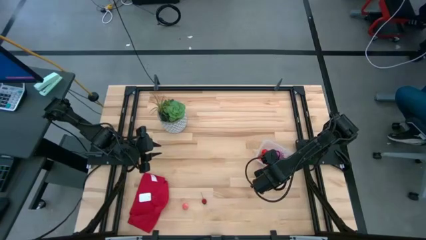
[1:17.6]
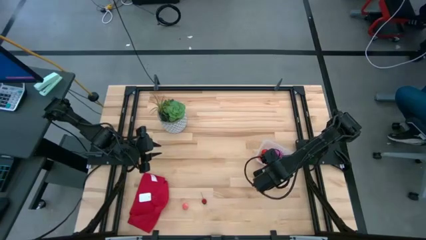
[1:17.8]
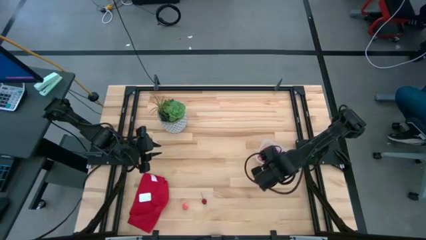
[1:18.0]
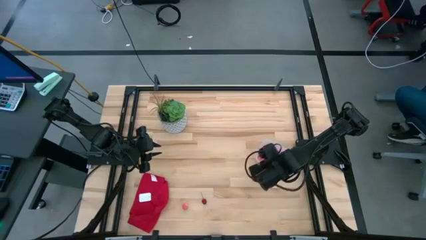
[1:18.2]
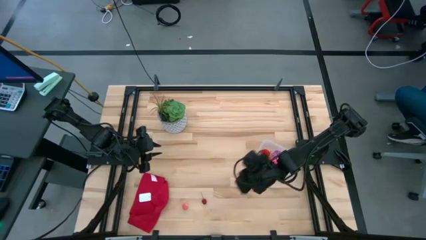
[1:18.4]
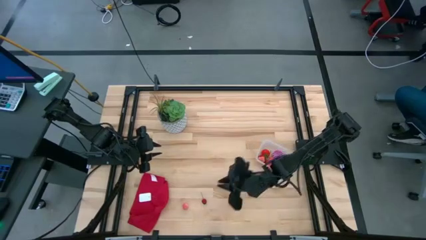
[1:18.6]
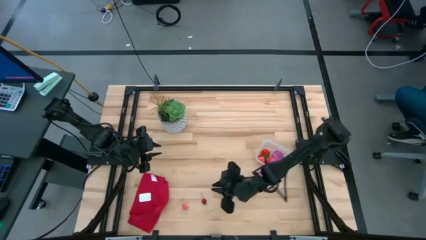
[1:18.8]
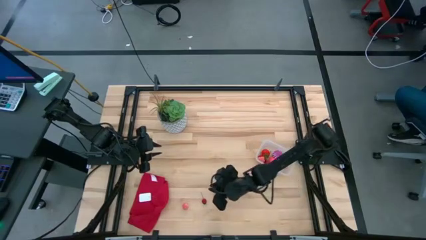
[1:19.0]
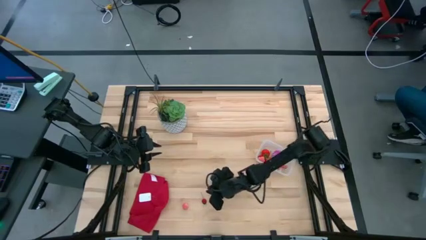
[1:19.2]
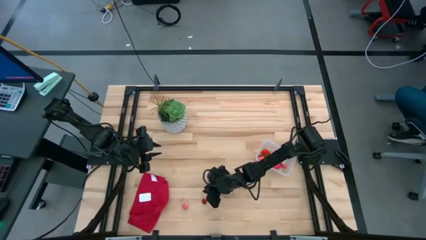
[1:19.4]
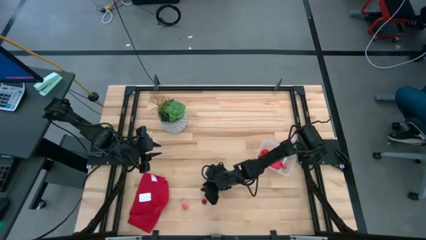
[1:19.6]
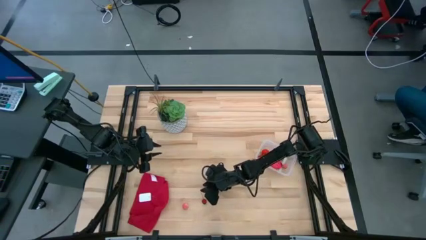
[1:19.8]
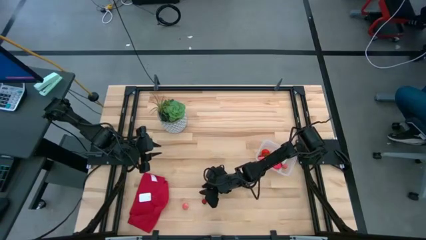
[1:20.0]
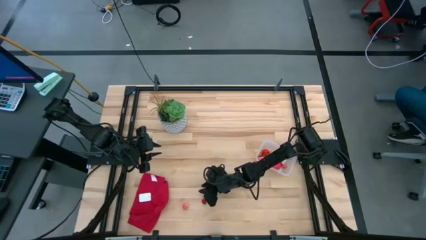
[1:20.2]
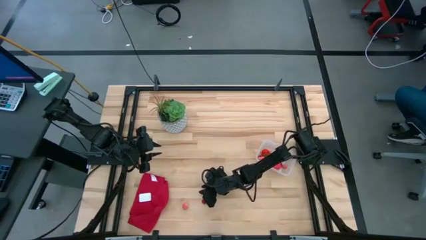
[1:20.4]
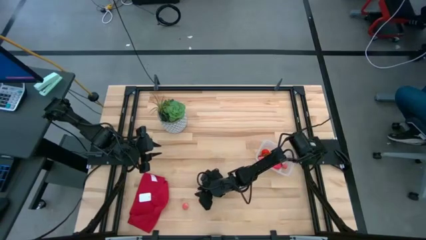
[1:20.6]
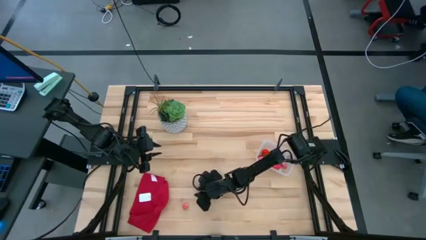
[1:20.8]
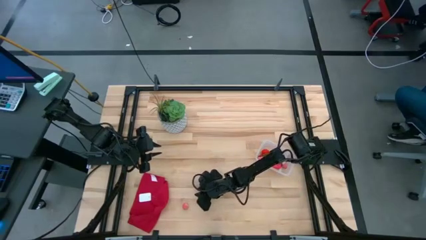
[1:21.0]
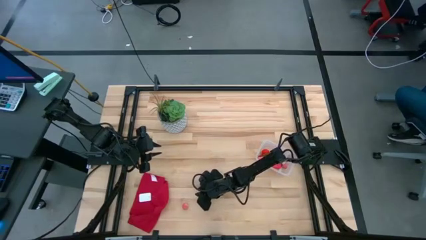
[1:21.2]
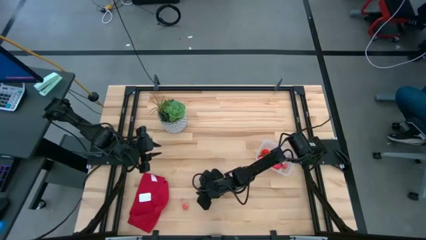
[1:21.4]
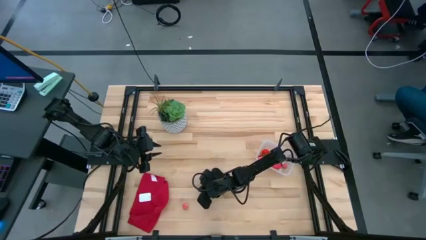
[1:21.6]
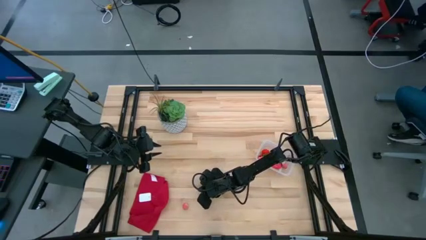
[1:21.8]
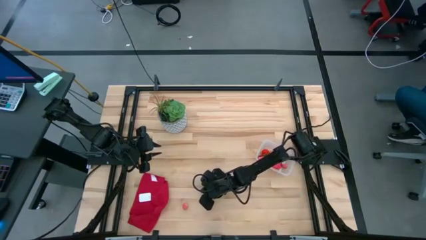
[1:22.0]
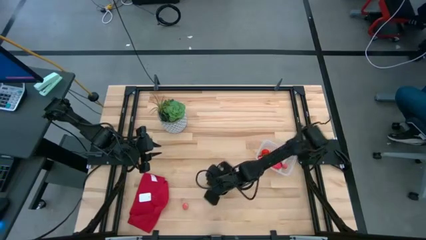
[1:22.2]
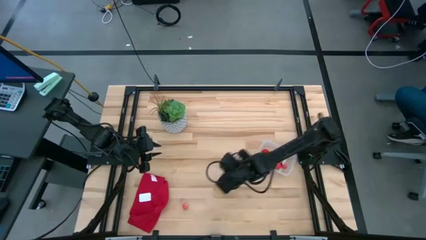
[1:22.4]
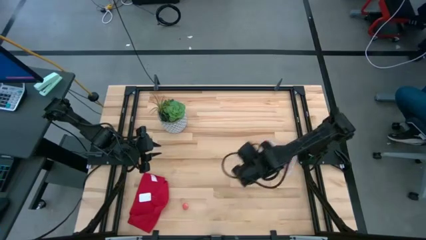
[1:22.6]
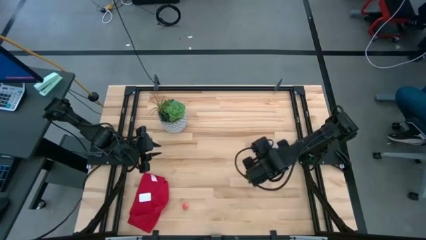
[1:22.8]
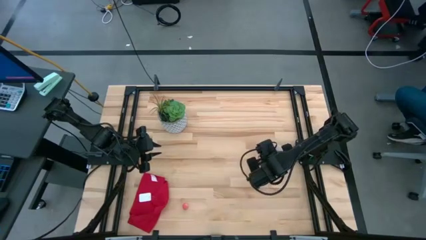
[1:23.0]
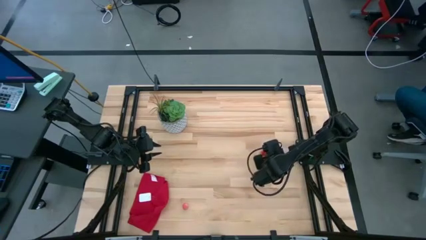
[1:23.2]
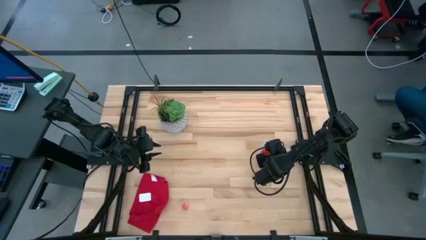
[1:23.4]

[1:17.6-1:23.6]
Task: Pick and placing Produce into tupperware
Put the red cherry into the transparent bin

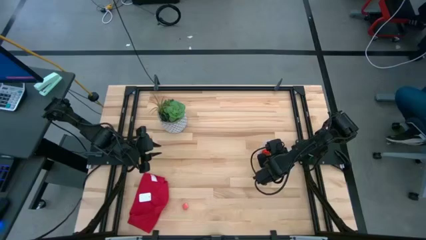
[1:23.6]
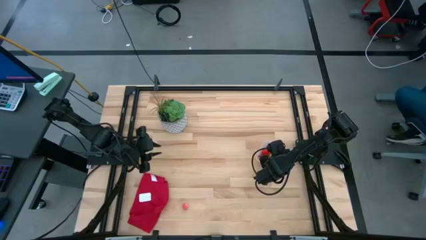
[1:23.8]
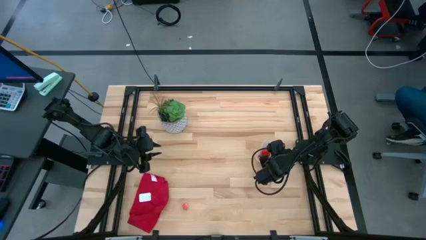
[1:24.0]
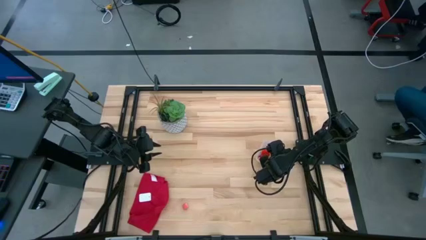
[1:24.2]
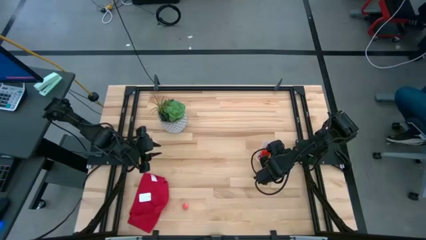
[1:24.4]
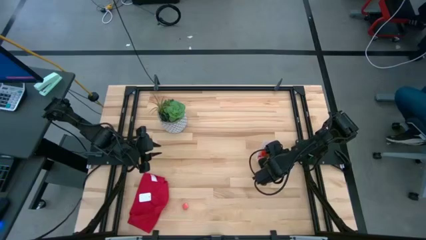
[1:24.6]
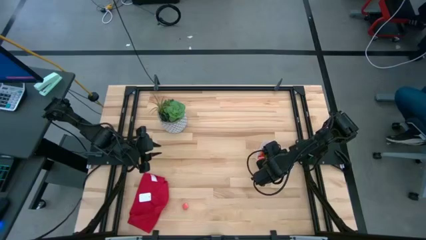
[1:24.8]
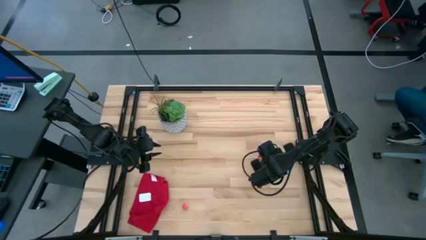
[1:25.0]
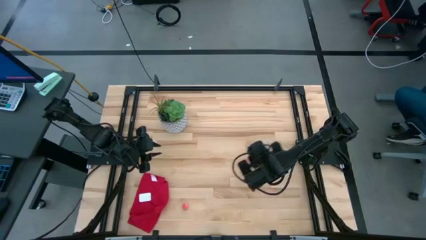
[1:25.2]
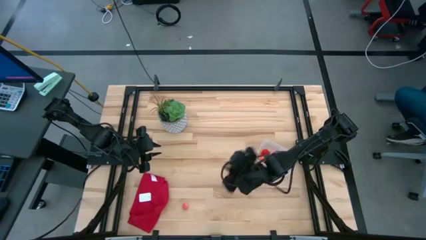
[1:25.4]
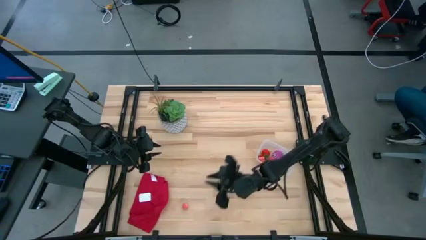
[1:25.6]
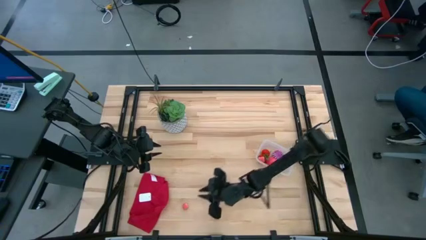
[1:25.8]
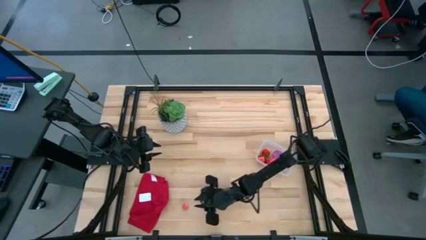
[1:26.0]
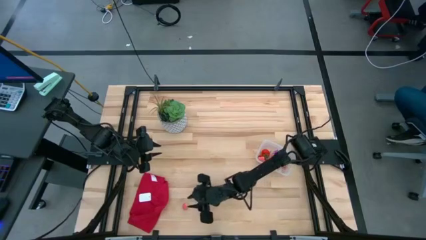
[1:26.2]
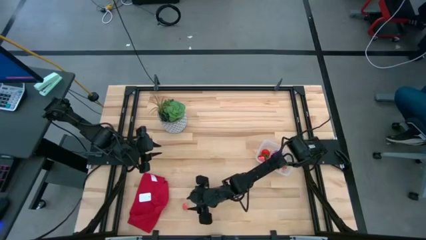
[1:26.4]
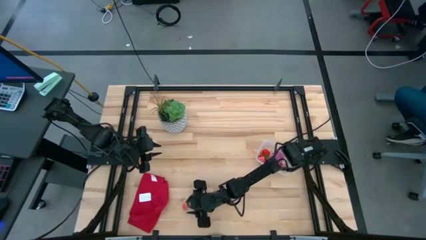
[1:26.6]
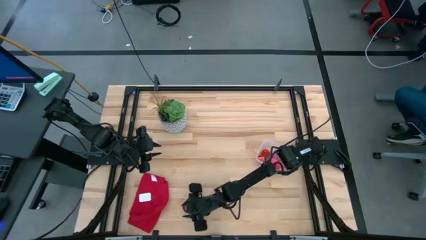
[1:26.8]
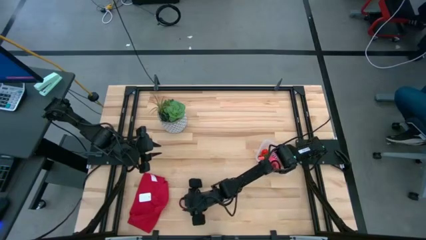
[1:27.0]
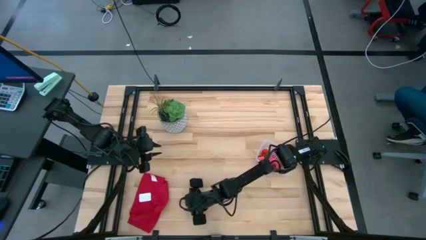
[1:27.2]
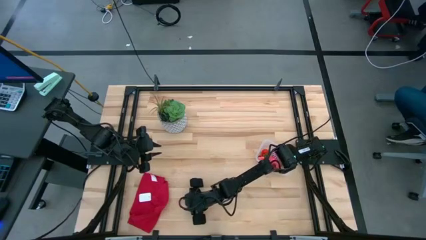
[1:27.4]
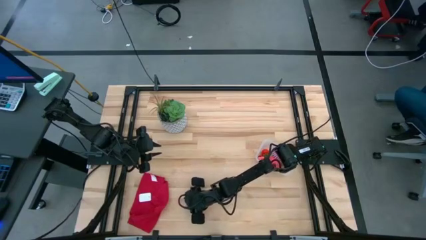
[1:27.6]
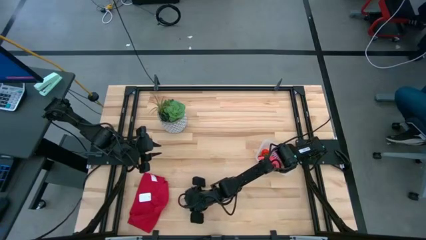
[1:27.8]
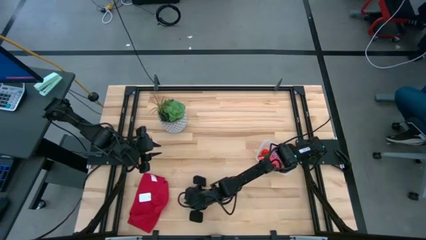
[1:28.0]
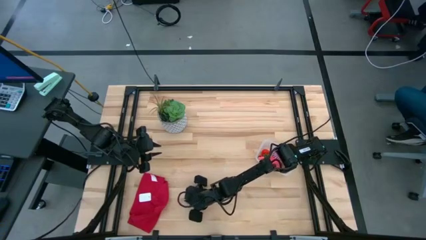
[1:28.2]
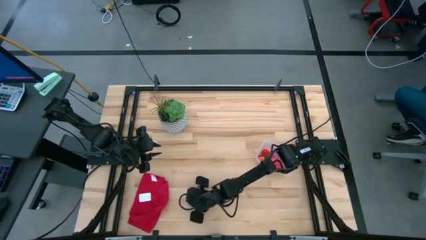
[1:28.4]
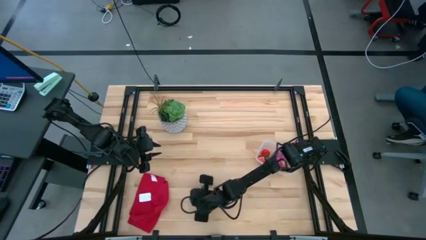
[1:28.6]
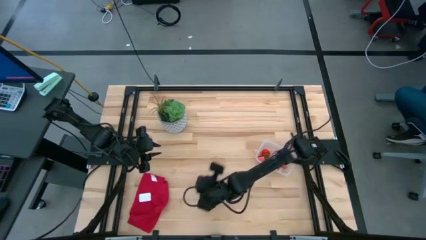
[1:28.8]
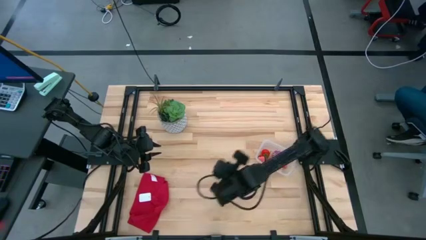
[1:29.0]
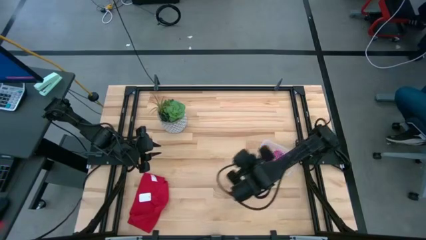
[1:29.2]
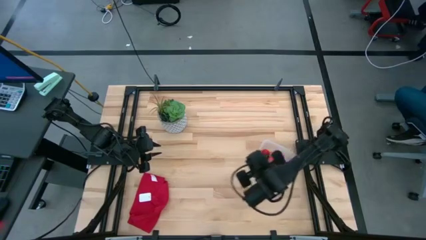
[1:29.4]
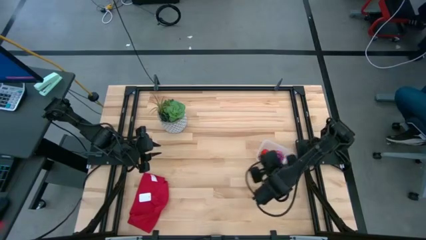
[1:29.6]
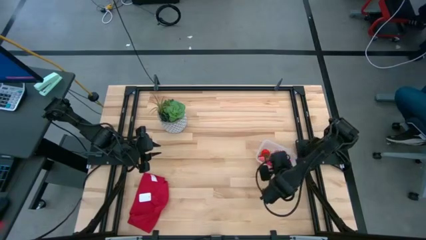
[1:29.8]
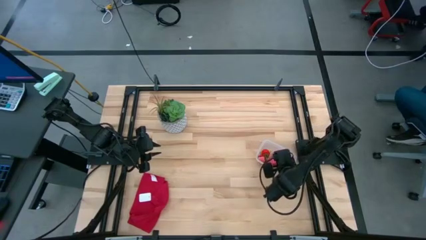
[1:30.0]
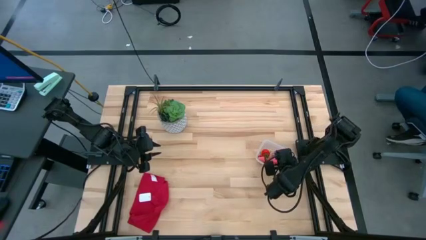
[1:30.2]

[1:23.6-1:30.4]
Put the pink peach into the transparent bin

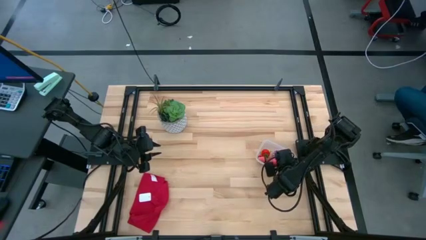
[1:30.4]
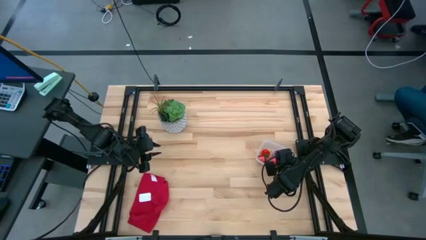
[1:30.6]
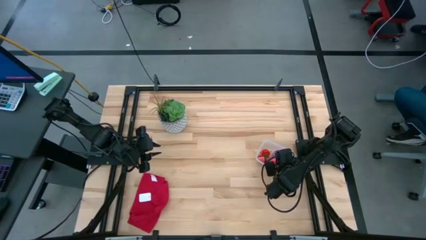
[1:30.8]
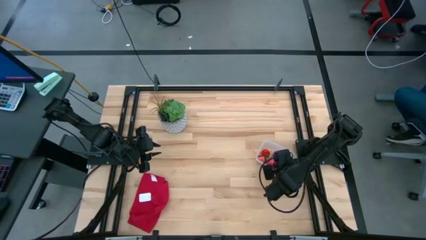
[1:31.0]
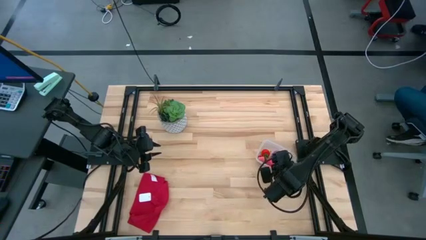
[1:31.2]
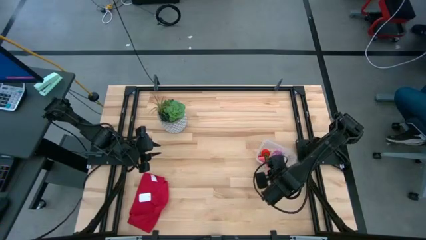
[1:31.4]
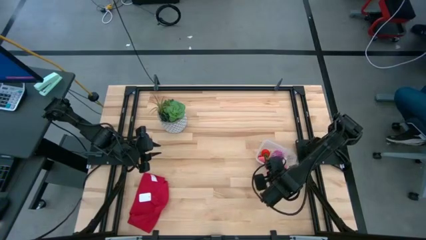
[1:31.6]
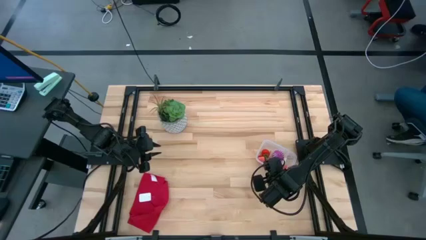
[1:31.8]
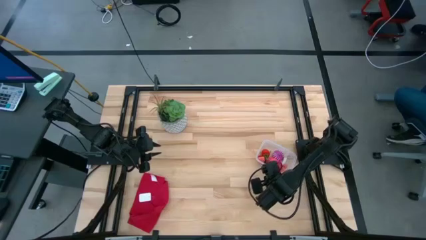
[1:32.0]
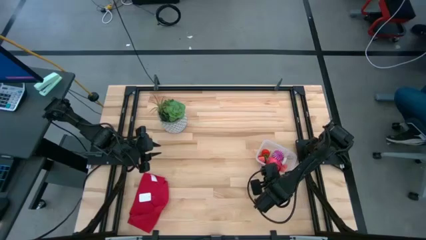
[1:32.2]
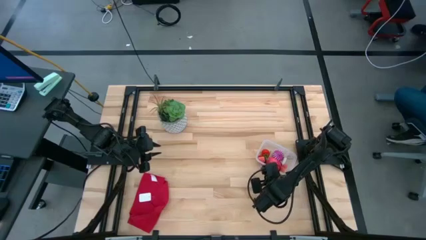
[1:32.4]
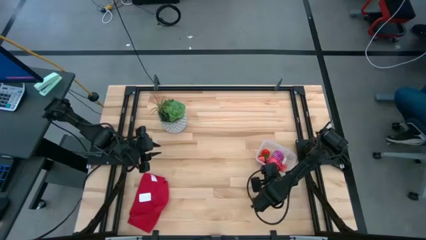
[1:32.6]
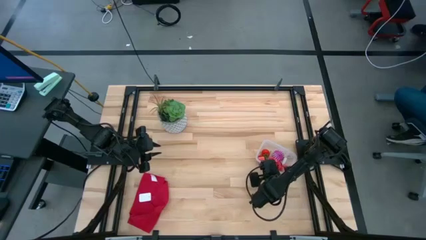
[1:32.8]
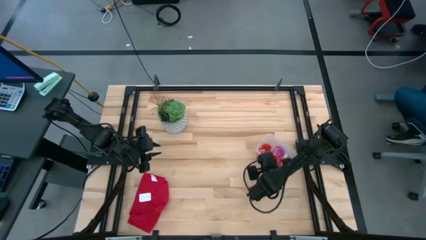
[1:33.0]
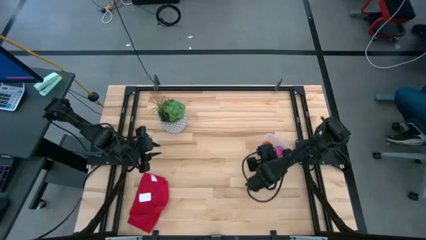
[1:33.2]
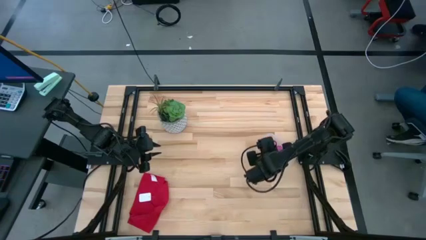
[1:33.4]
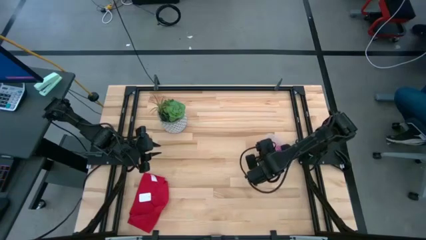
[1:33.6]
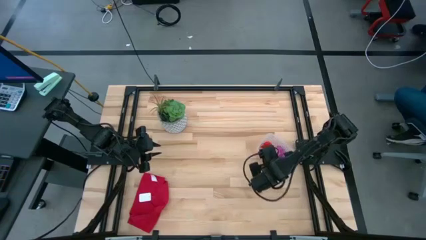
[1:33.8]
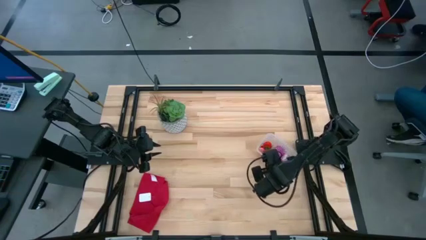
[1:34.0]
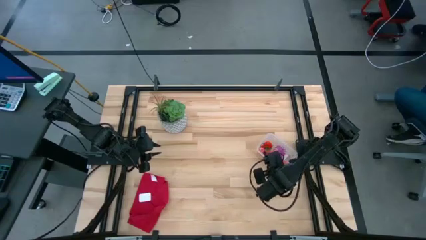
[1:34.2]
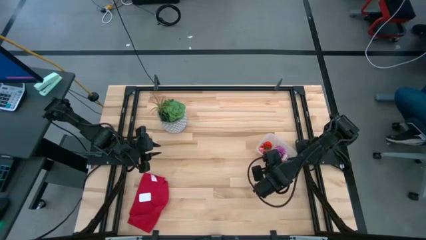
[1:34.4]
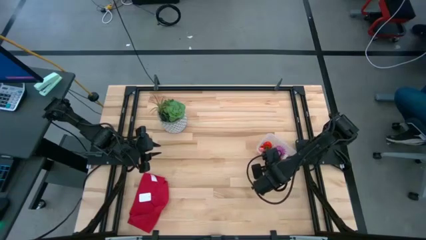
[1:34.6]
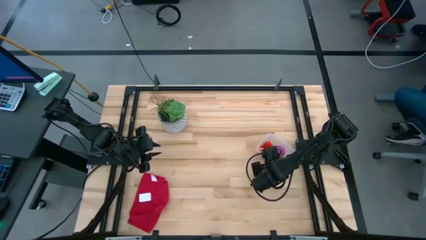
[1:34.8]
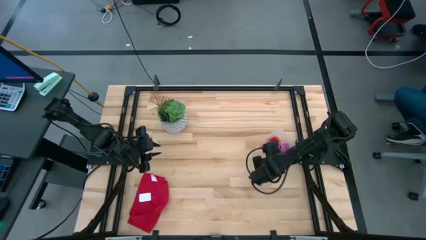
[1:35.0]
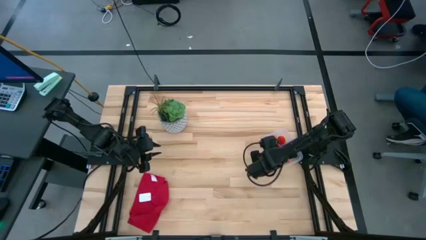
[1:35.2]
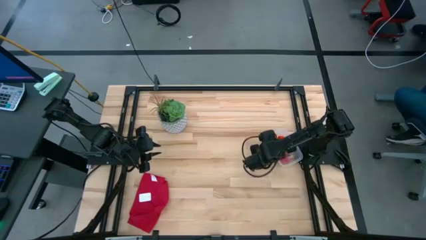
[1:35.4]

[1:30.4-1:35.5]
Adjust the red cherry in the transparent bin
